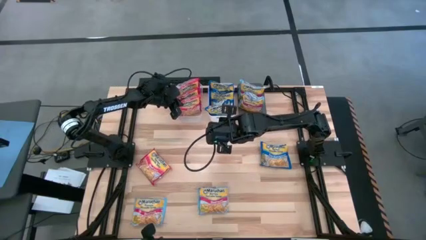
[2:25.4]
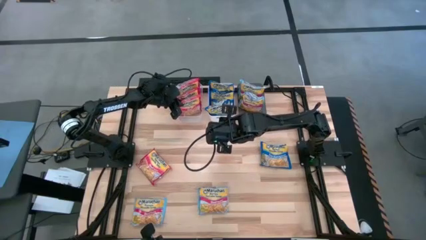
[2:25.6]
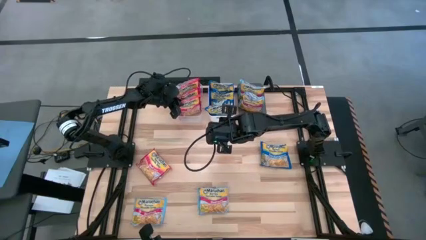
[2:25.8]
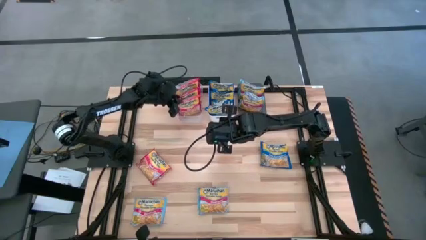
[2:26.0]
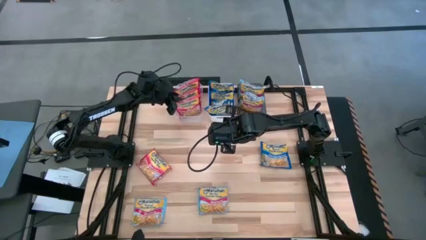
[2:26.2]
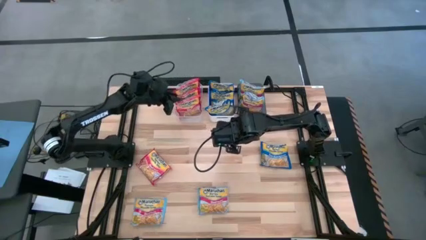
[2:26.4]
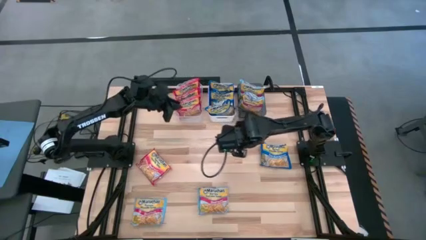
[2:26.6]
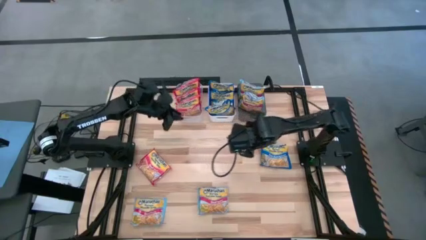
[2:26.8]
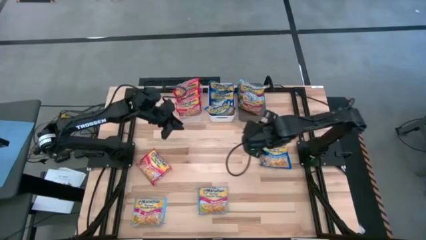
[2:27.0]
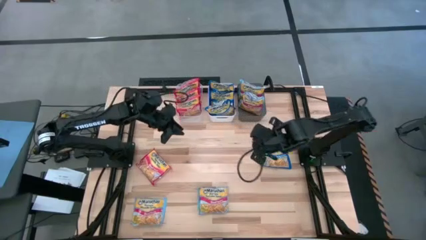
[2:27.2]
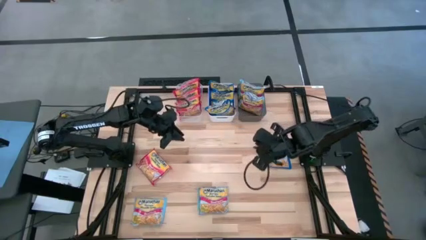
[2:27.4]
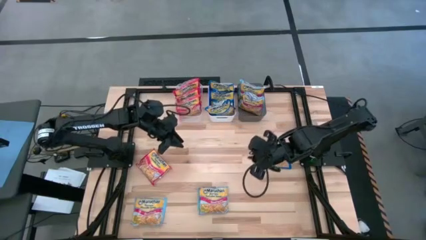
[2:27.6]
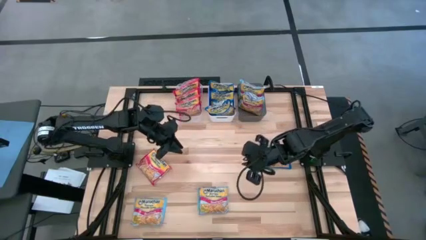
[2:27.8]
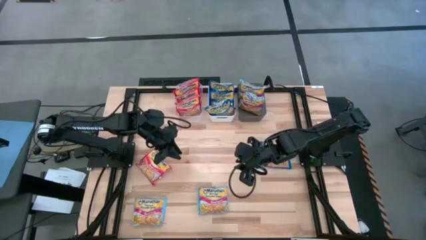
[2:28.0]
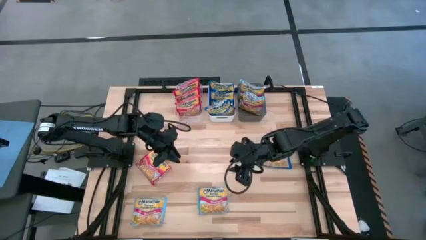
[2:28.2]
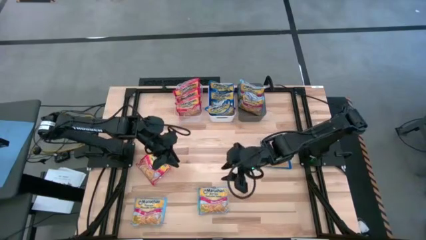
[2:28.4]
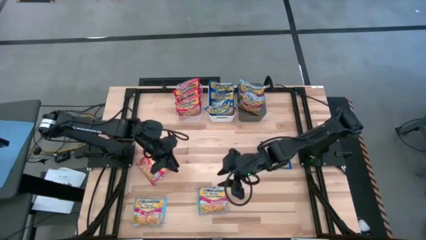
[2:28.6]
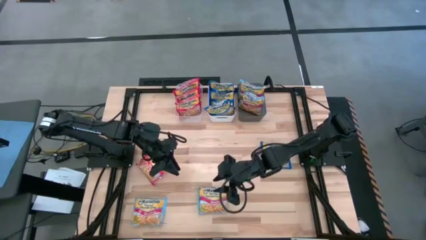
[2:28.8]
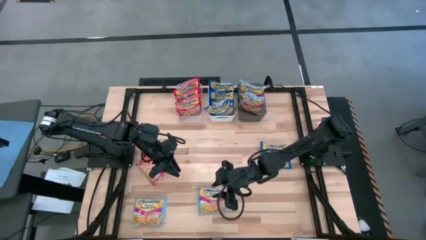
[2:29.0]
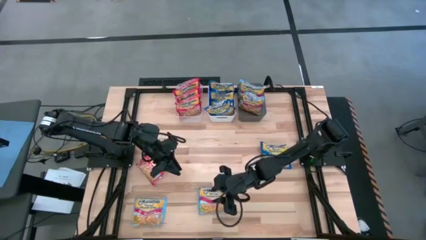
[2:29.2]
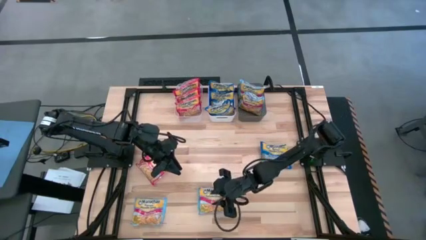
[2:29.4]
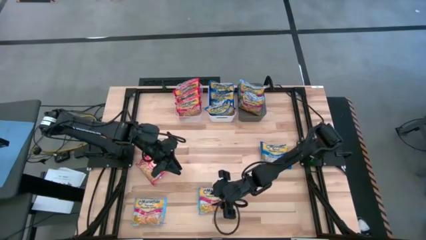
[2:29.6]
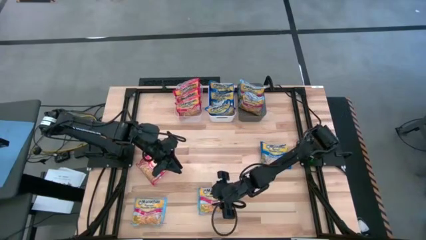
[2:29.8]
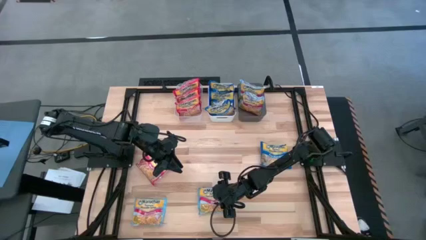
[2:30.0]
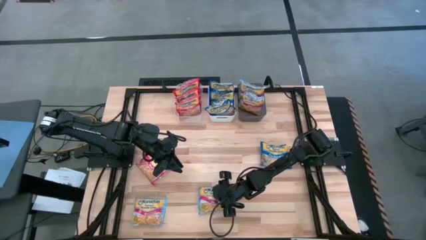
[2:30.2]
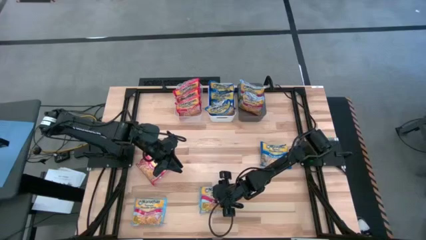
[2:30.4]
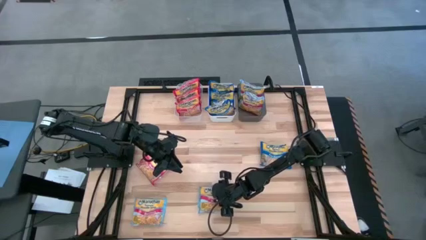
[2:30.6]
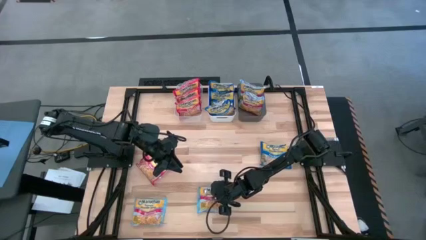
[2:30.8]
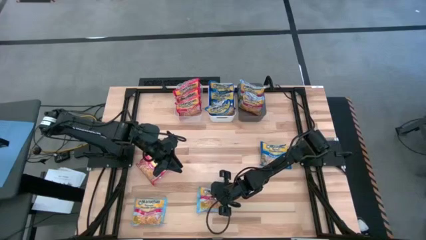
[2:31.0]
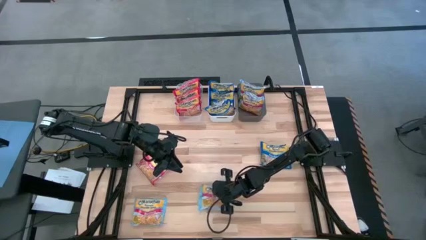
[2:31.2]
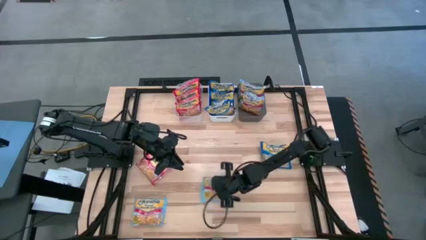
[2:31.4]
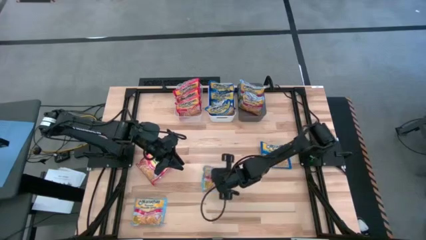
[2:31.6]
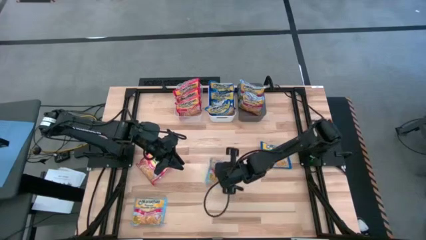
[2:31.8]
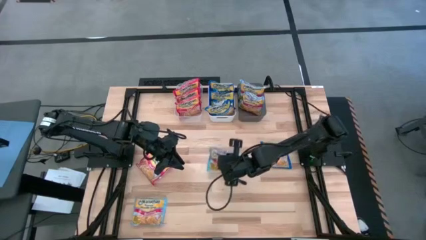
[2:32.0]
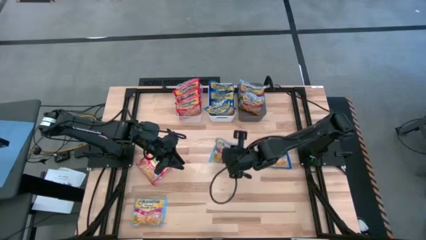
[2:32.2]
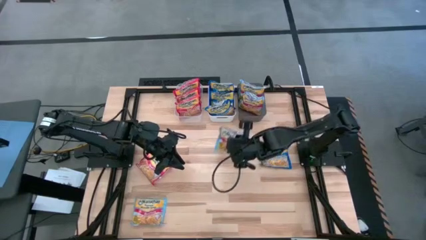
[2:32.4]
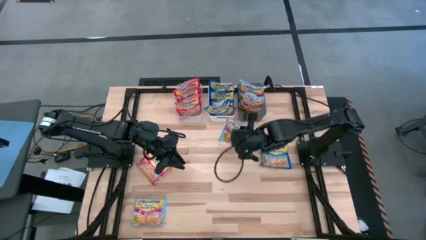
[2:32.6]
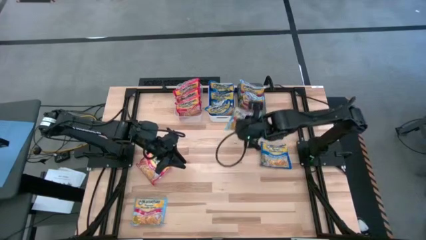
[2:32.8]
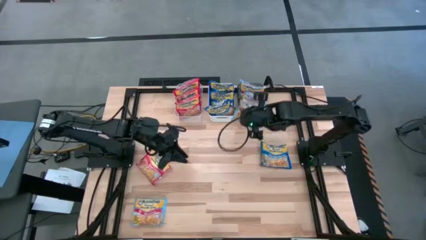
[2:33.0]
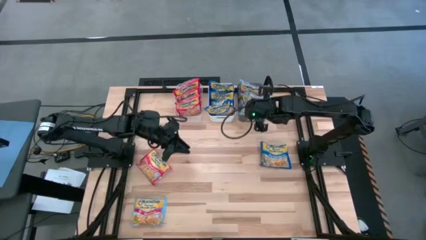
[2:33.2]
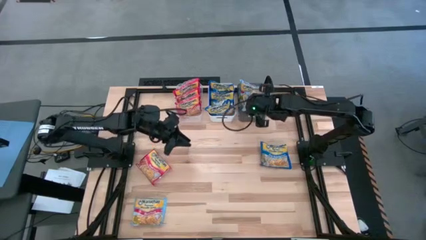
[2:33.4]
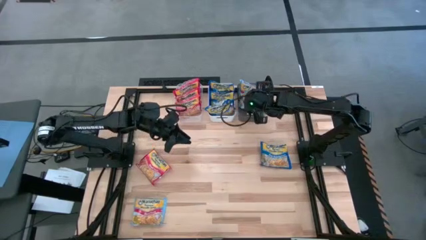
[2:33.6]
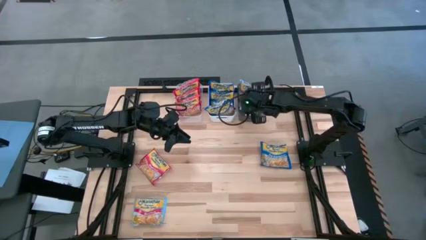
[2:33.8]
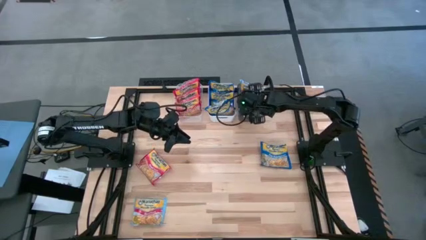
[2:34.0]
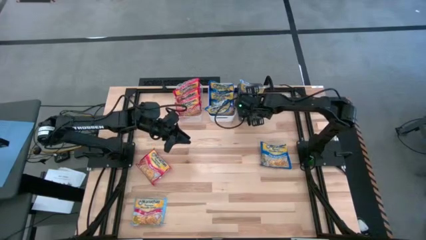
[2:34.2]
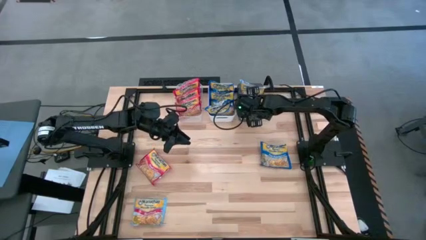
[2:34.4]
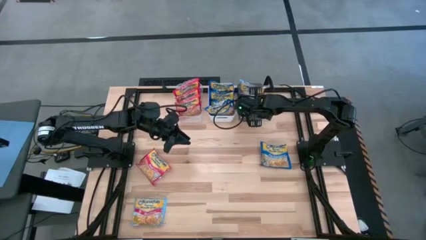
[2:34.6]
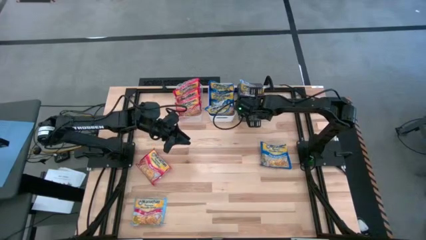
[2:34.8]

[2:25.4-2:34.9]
Task: Sort Maruchan noodles
Put the light blue noodle pack into the black bin

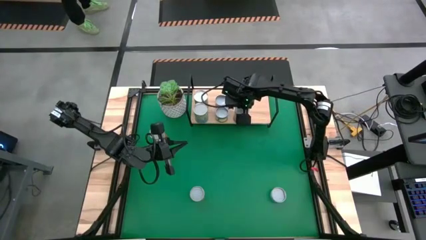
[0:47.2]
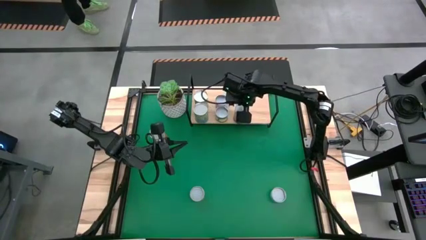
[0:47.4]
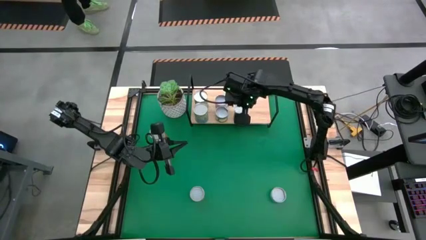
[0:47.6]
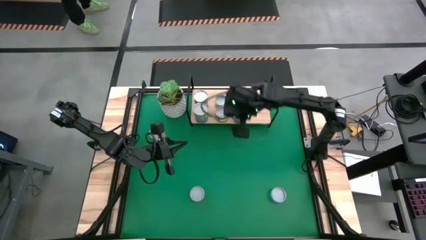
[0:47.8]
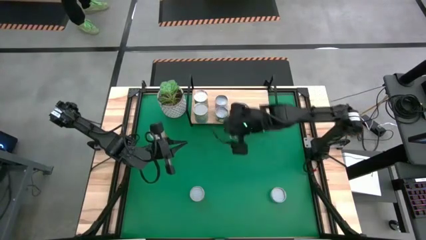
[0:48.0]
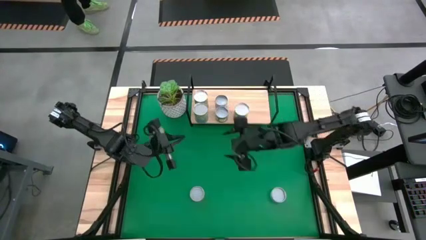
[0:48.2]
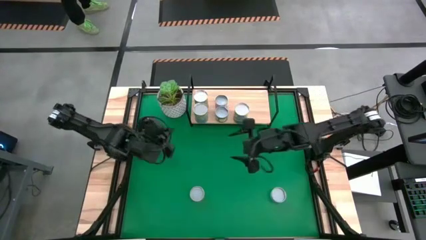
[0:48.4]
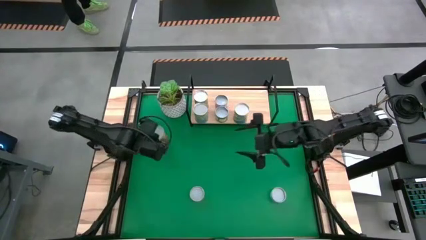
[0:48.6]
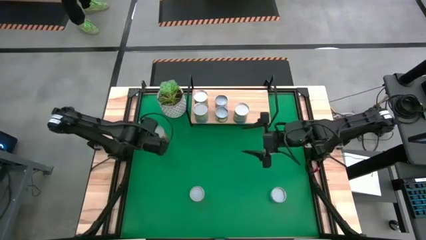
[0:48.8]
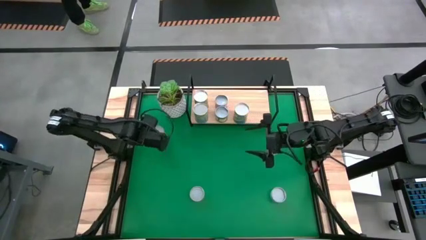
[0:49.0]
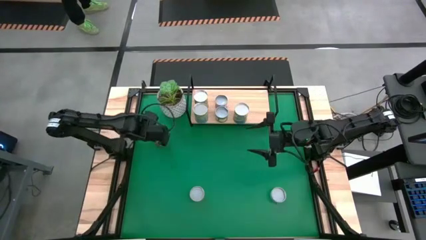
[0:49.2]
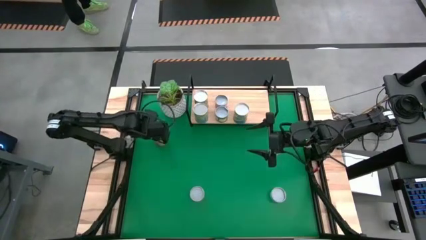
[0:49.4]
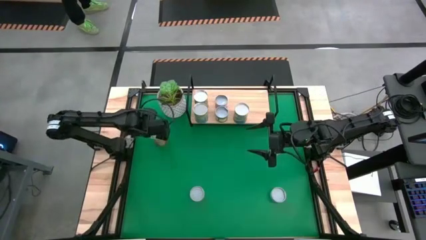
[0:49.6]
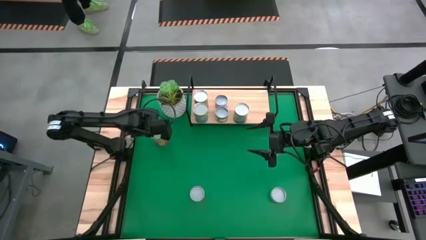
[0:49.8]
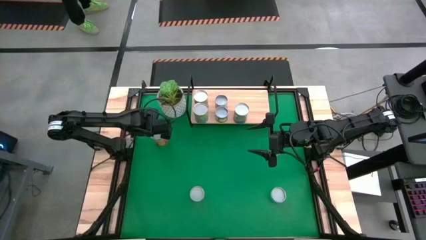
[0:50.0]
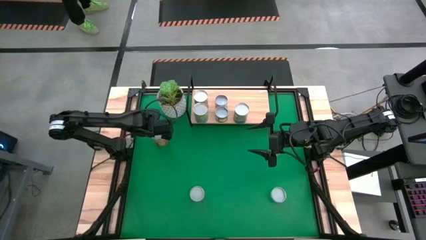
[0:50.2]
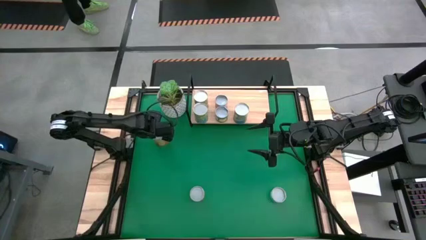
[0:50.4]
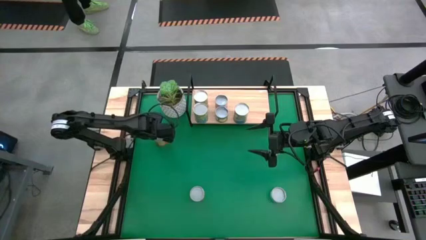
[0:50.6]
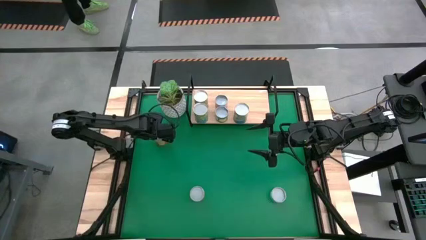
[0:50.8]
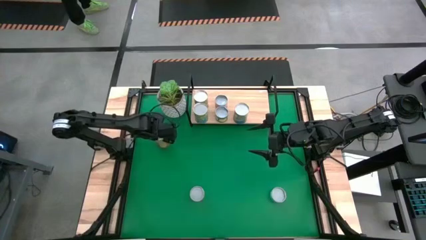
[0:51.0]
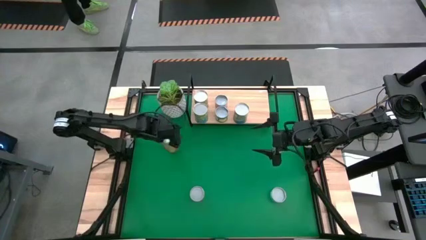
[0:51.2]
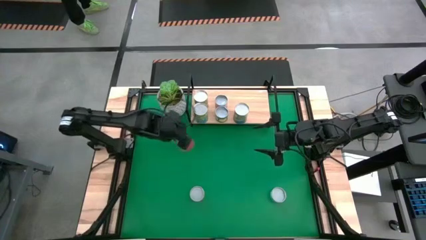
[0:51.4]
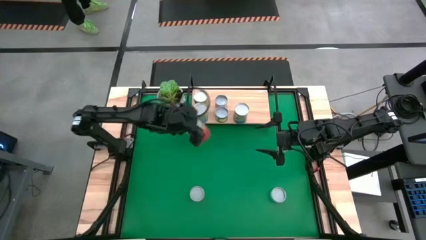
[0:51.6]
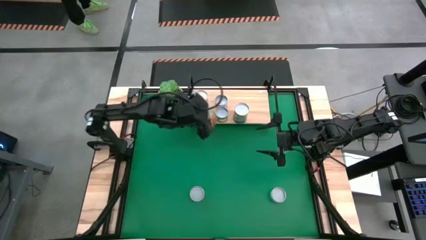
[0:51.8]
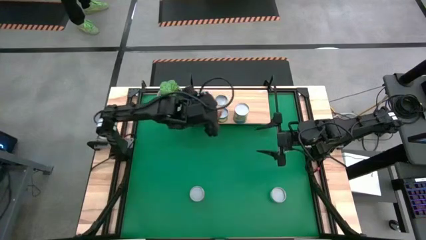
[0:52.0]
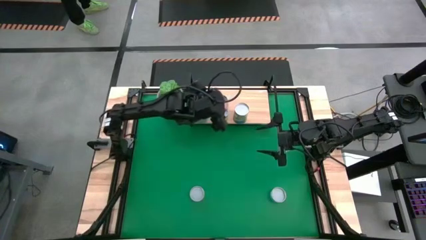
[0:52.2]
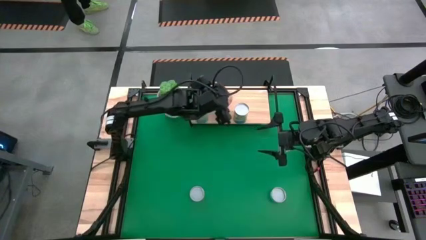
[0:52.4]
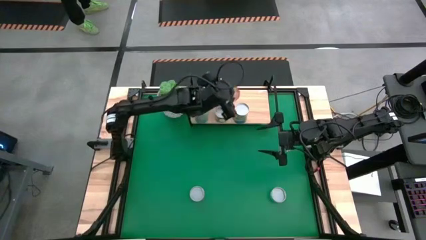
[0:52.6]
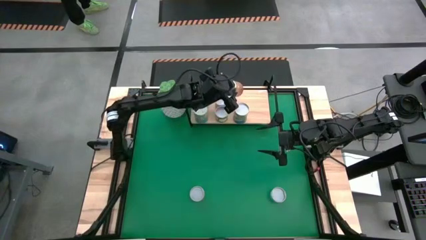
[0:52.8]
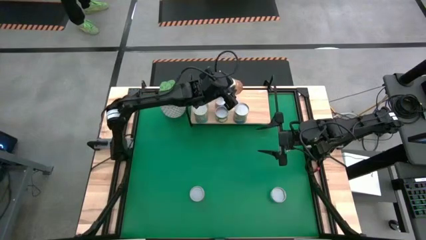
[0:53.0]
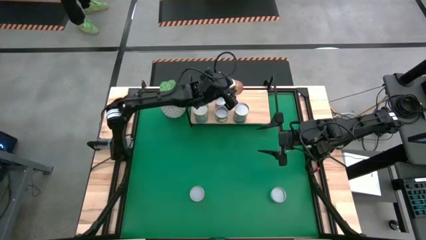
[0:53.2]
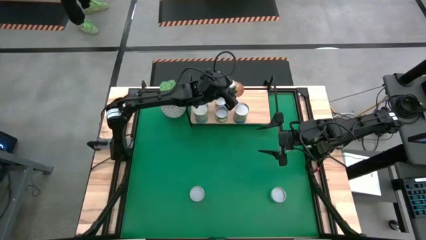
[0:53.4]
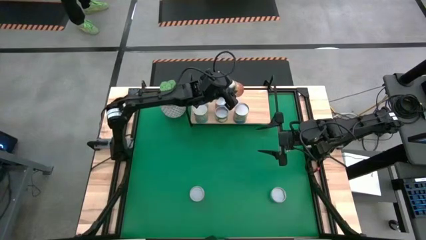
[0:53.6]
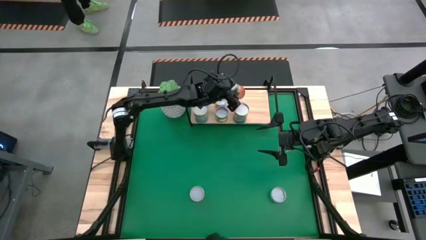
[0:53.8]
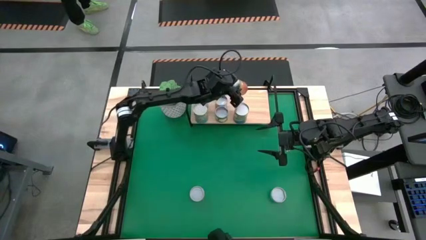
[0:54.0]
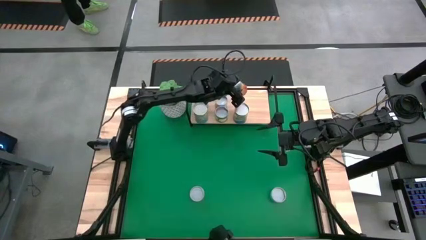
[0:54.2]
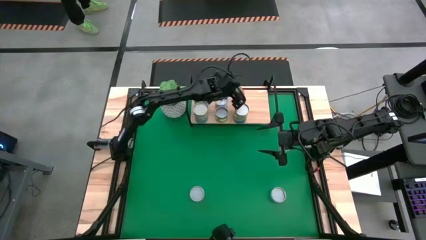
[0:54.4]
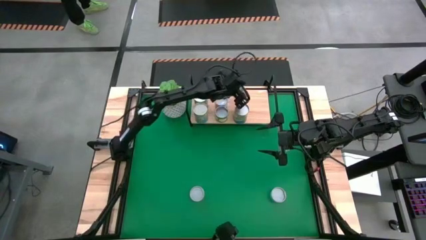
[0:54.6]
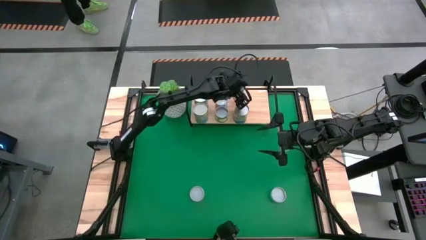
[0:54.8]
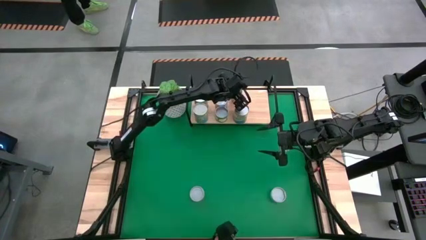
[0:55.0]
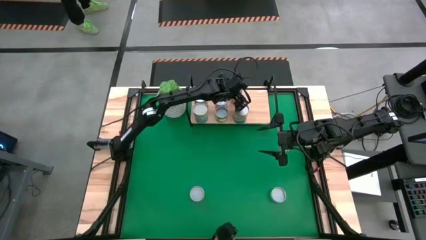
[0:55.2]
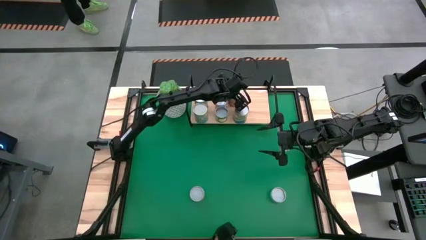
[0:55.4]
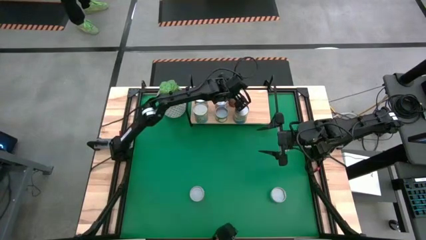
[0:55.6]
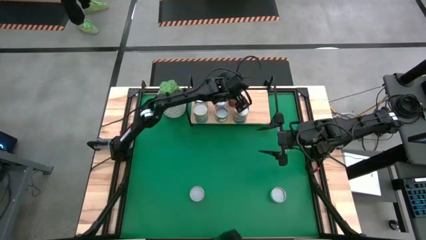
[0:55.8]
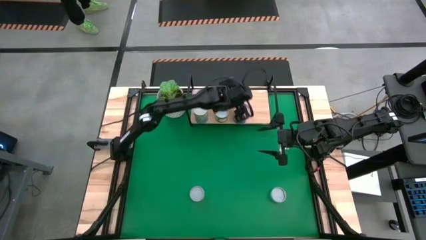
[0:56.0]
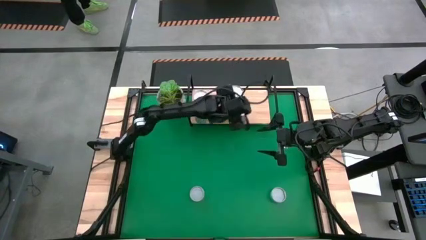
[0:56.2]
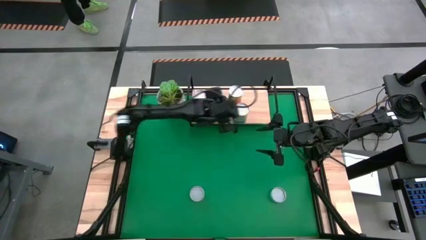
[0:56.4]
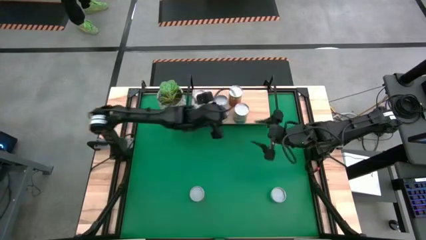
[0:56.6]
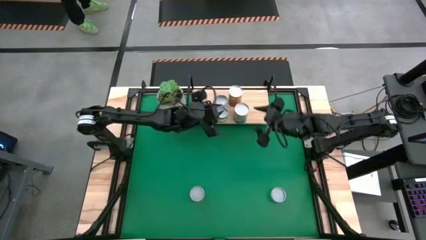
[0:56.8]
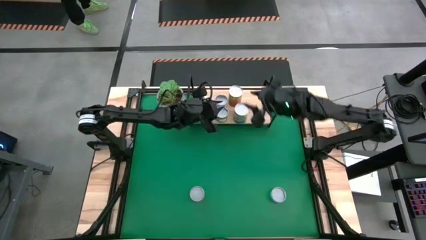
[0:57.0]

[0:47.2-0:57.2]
Task: Pick and place cans onto a shelf
Put the canned pineapple on the shelf
